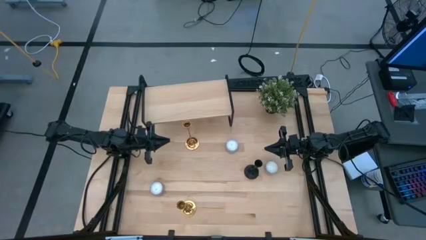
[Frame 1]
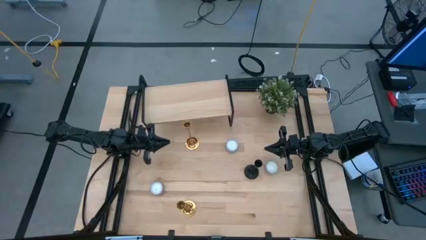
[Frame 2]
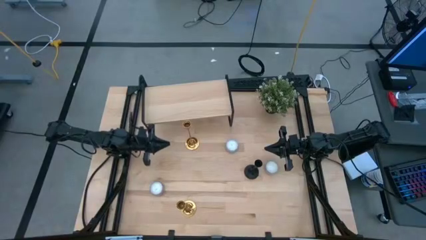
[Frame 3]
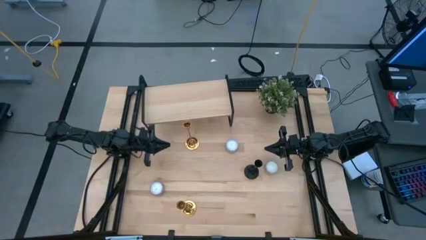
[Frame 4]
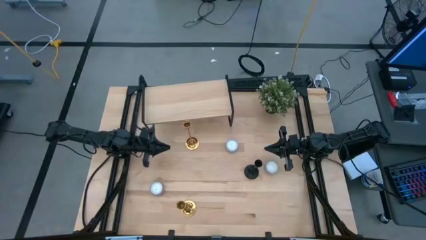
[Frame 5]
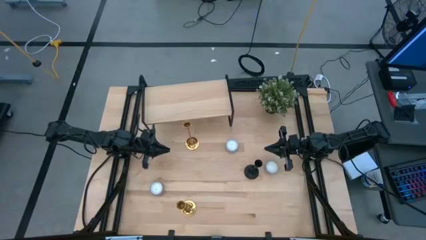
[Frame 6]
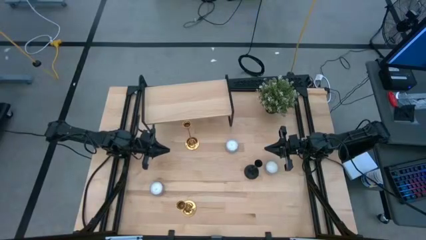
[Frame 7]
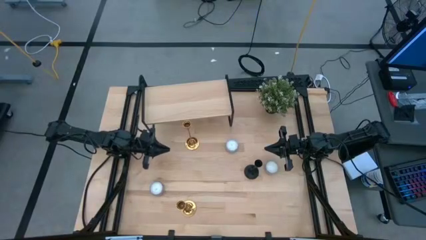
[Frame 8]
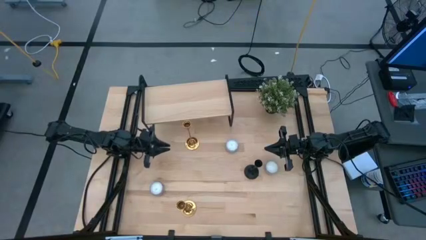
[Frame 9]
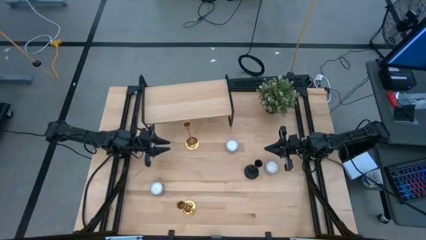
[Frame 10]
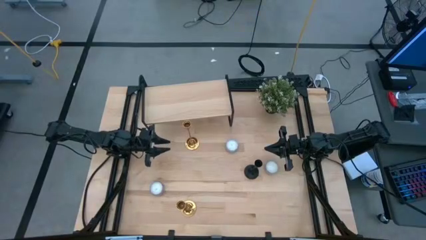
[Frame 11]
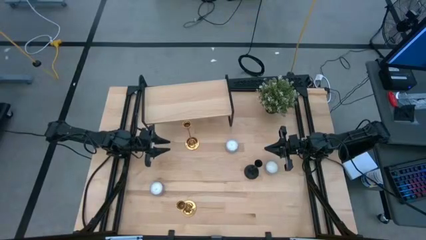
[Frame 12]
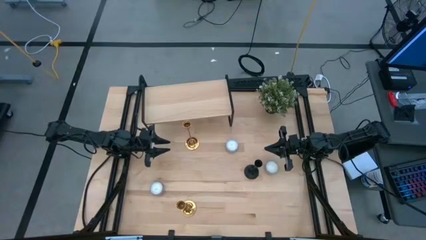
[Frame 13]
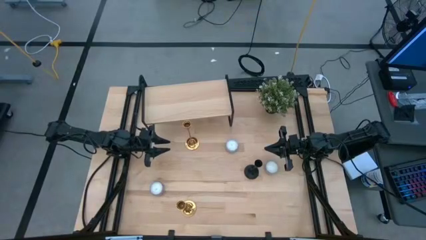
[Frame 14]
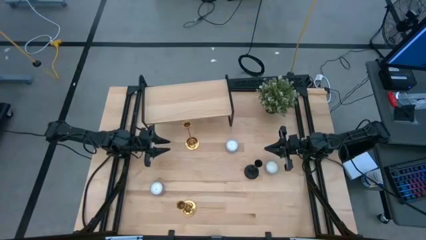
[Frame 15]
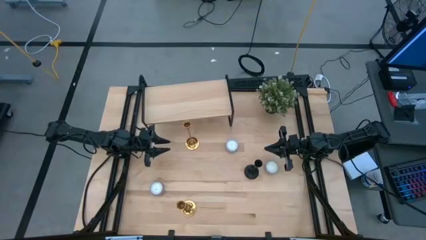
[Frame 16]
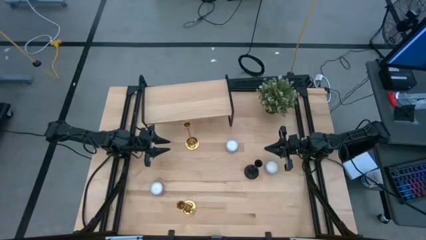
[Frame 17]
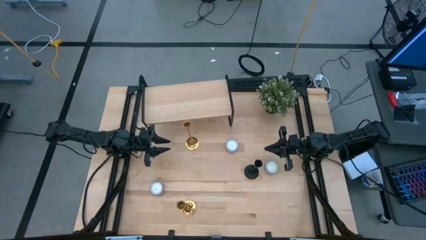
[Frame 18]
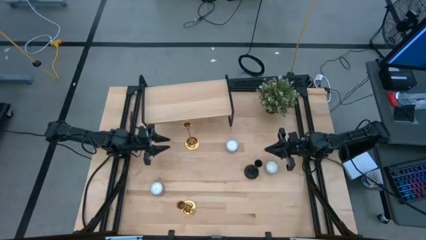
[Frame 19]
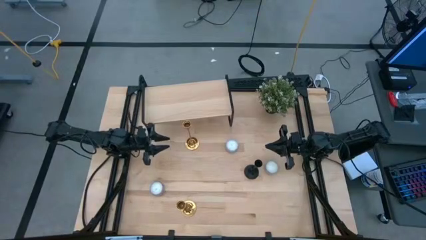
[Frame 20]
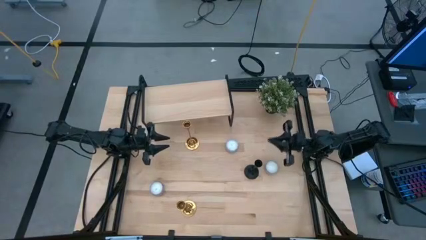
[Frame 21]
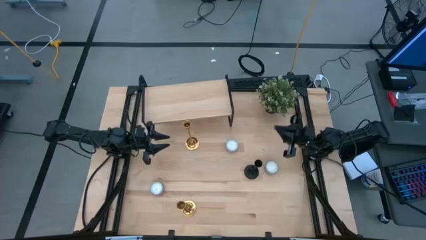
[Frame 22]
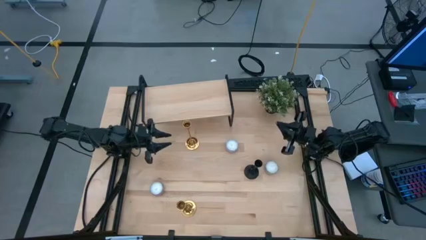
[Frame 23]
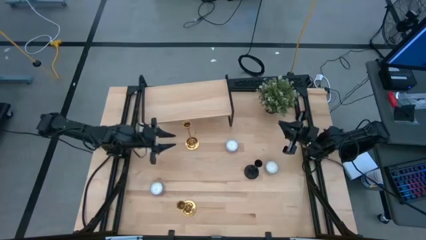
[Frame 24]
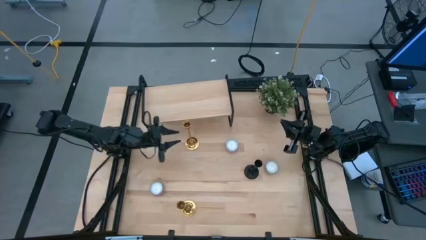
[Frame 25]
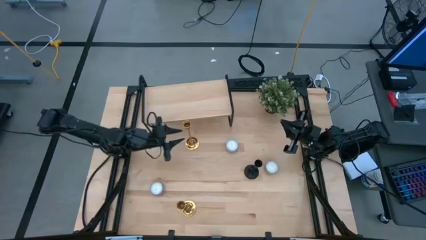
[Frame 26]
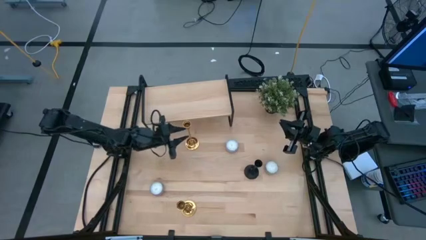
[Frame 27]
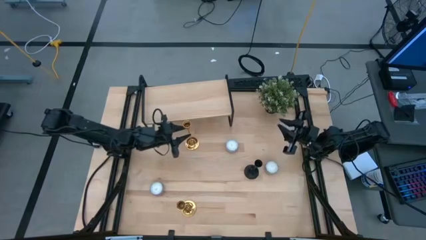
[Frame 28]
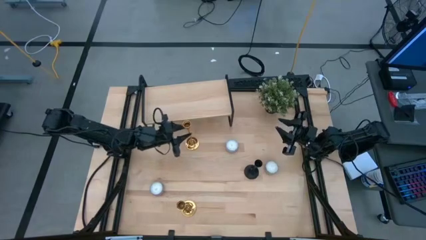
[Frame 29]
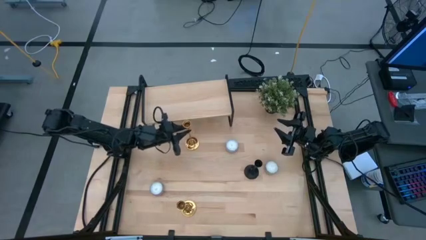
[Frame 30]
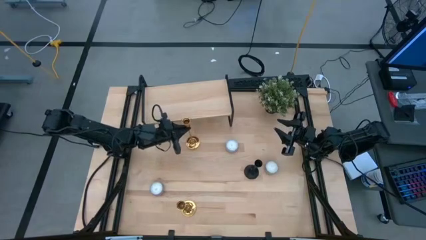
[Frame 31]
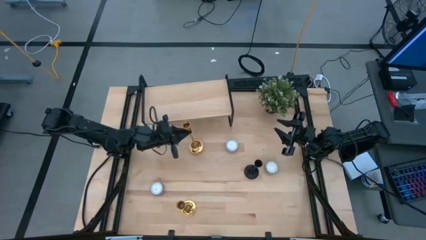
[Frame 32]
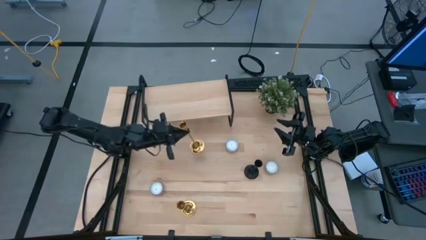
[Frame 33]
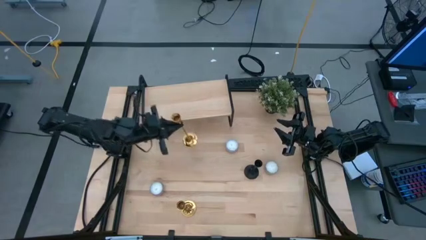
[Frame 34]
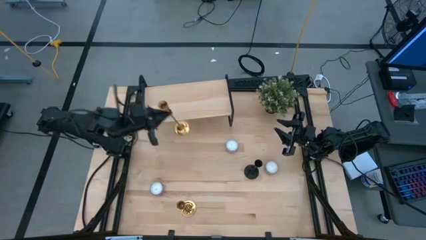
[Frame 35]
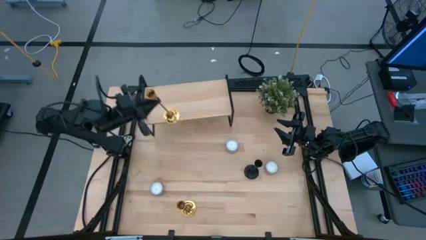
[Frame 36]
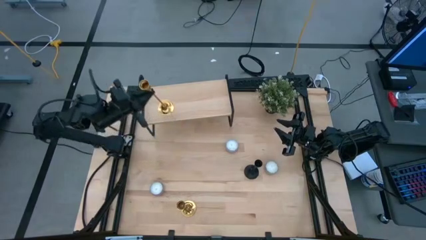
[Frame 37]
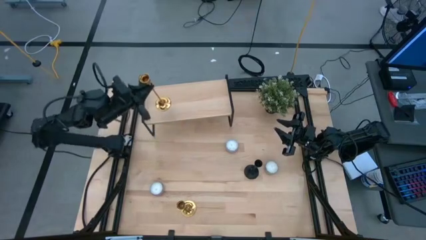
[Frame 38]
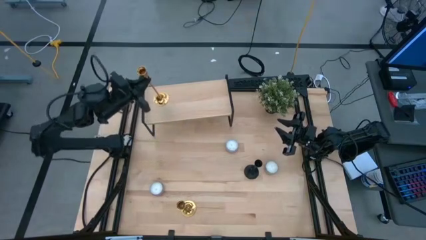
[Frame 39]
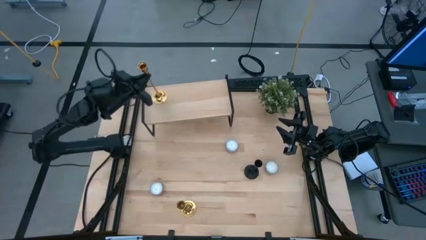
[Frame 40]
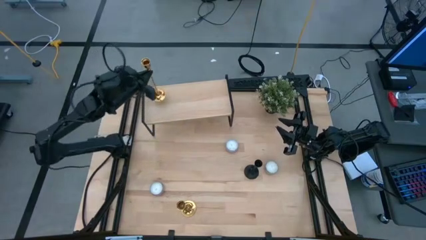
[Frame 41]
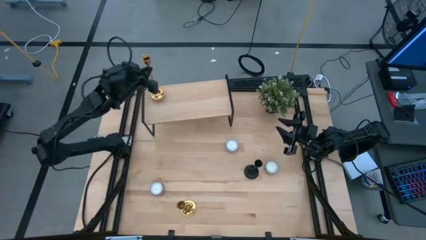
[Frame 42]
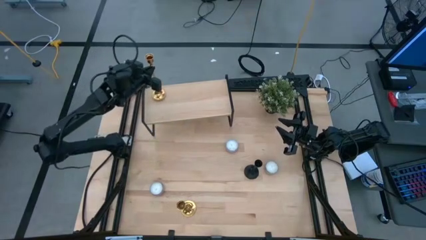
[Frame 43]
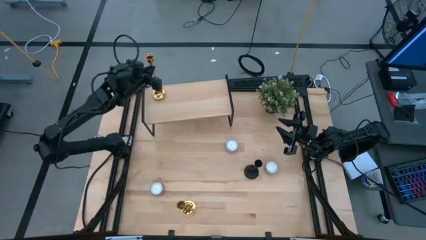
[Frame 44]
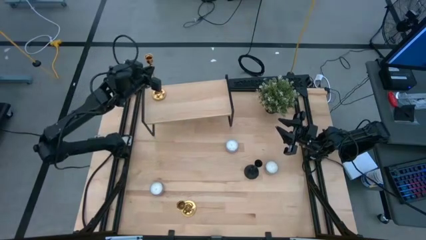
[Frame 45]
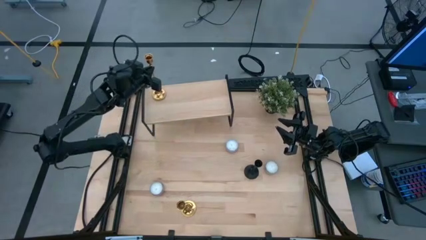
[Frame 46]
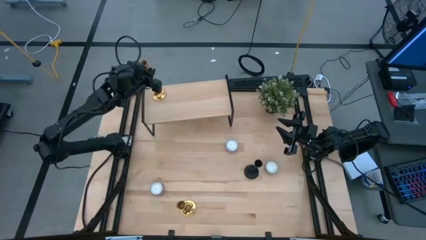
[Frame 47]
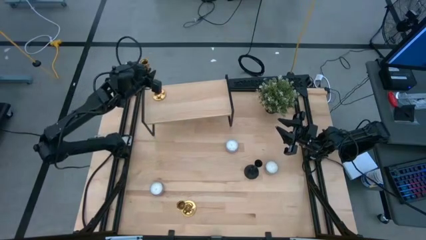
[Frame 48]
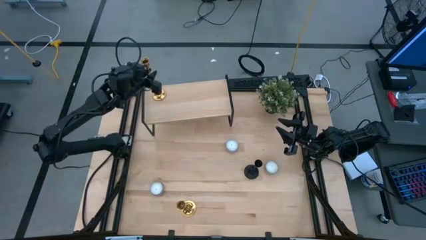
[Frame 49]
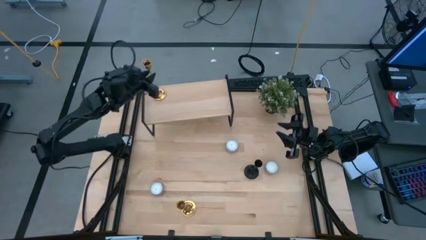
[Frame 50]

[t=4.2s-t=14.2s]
Task: Pick & Place candle stick holders
Put the top gold candle holder on the shelf

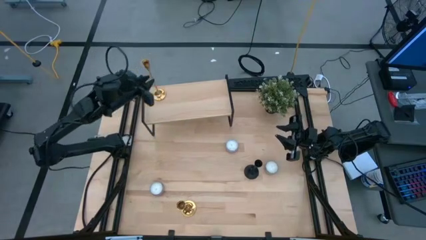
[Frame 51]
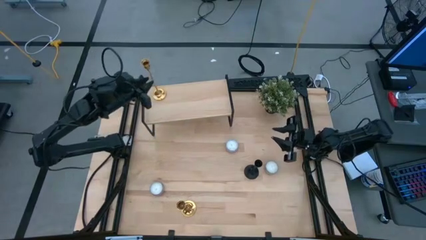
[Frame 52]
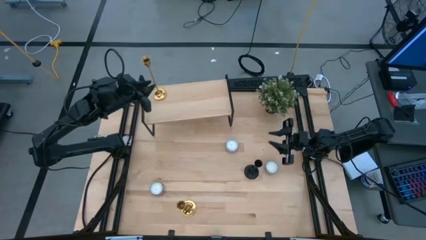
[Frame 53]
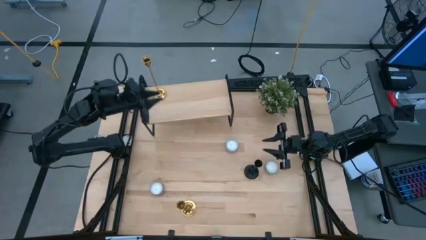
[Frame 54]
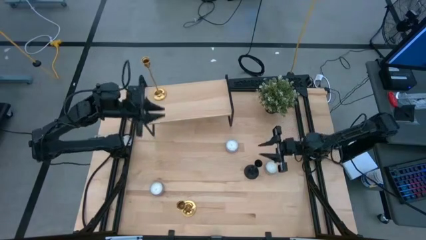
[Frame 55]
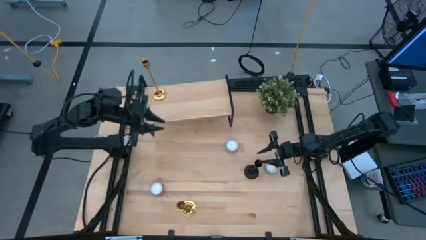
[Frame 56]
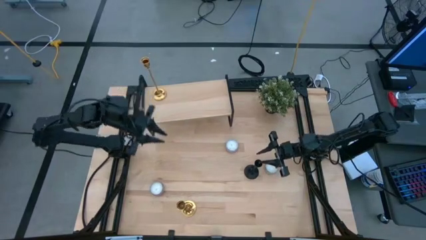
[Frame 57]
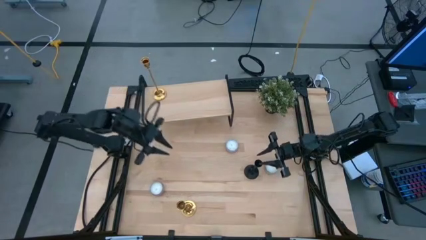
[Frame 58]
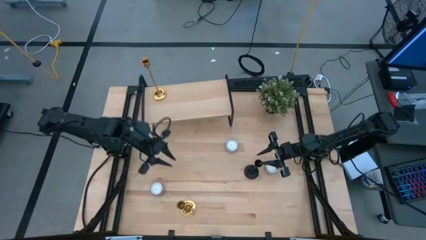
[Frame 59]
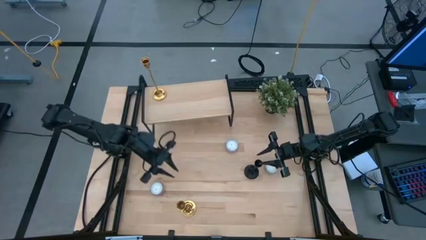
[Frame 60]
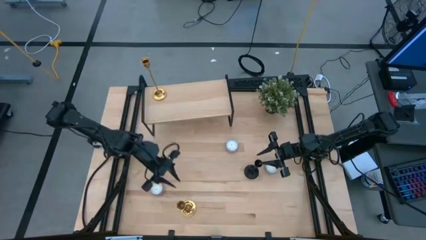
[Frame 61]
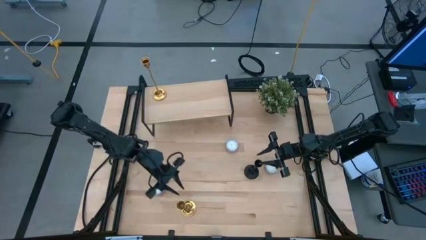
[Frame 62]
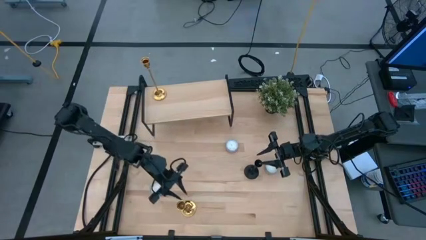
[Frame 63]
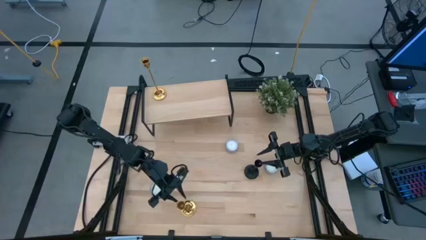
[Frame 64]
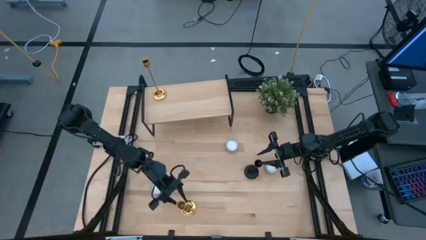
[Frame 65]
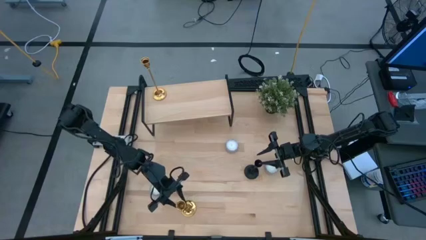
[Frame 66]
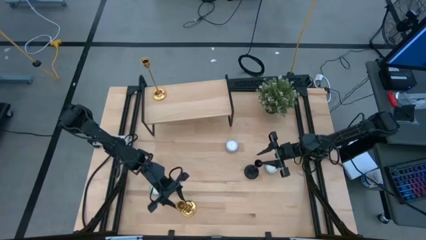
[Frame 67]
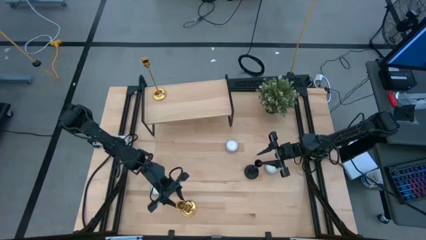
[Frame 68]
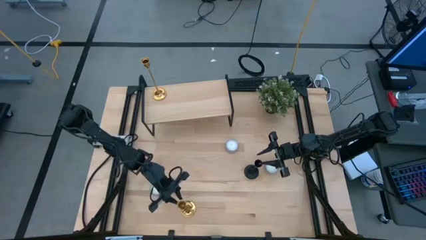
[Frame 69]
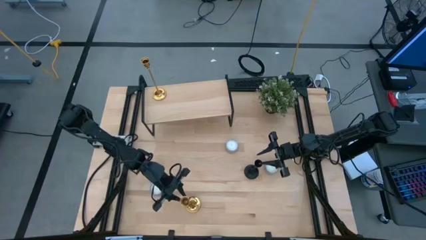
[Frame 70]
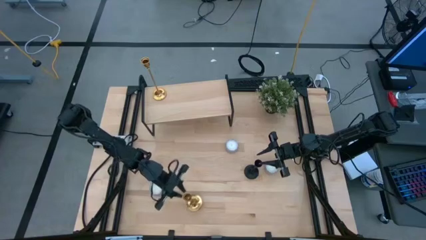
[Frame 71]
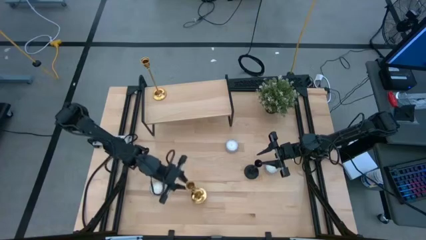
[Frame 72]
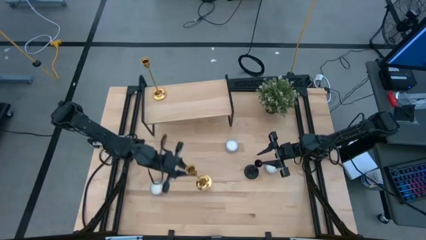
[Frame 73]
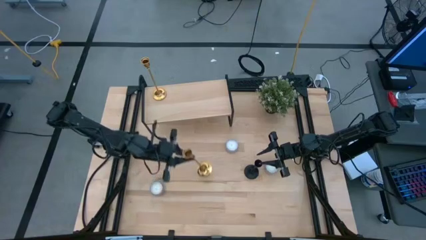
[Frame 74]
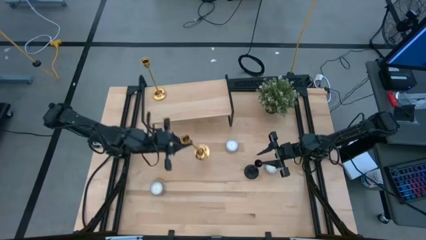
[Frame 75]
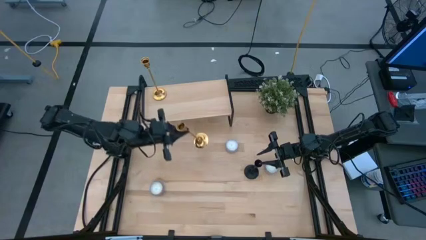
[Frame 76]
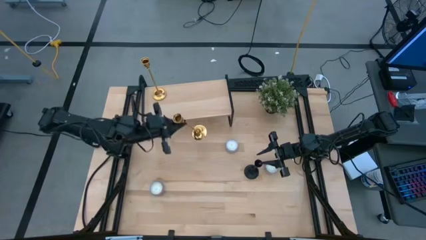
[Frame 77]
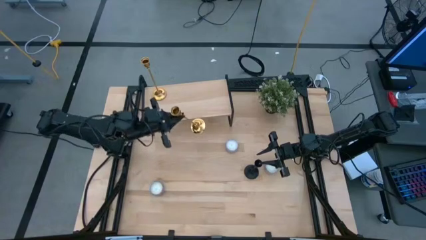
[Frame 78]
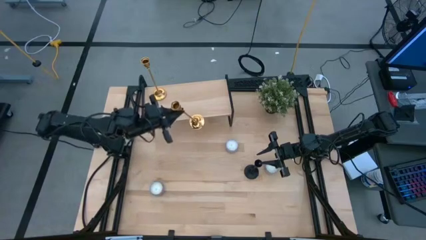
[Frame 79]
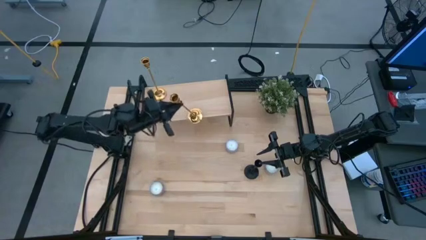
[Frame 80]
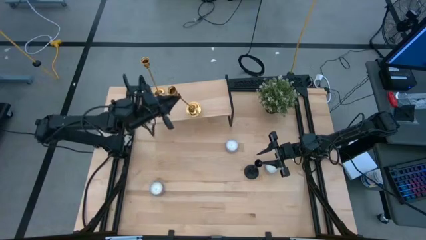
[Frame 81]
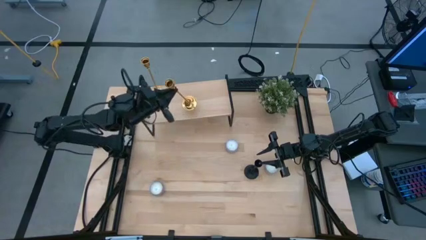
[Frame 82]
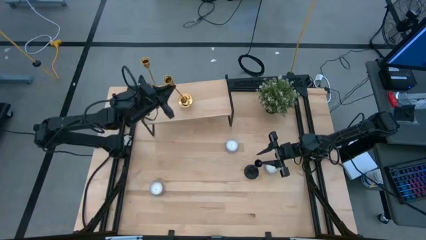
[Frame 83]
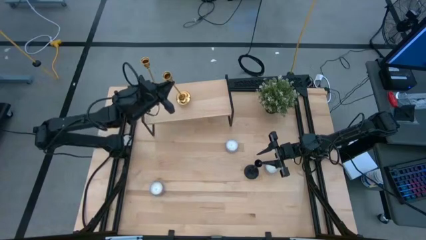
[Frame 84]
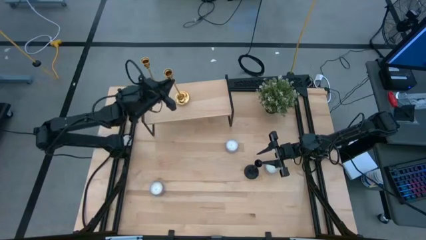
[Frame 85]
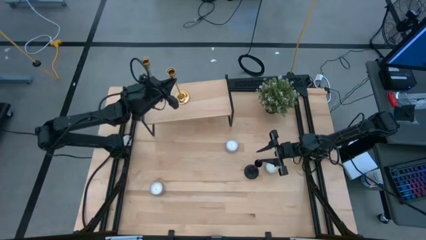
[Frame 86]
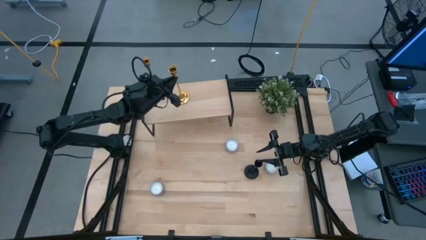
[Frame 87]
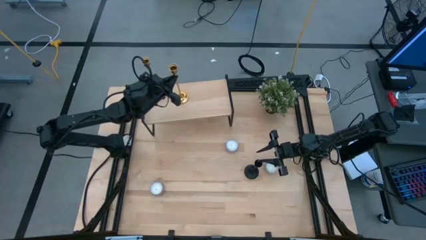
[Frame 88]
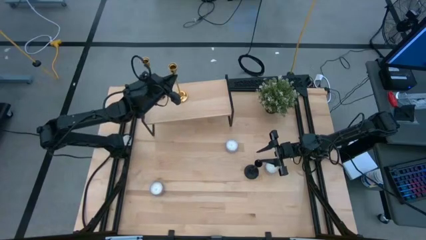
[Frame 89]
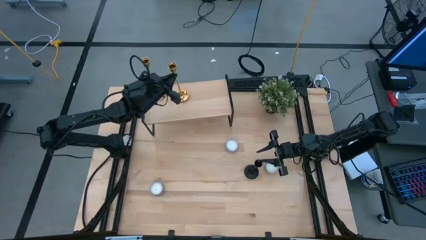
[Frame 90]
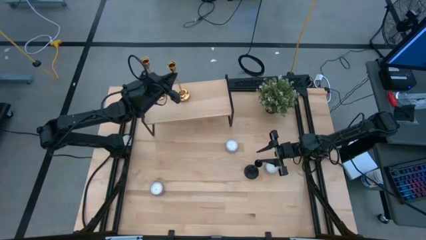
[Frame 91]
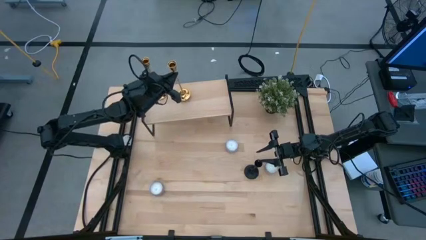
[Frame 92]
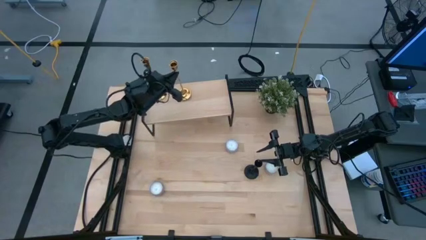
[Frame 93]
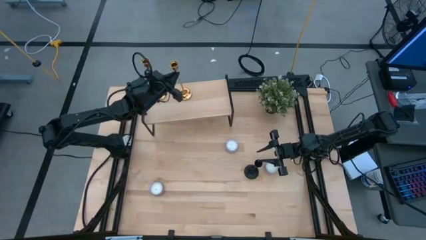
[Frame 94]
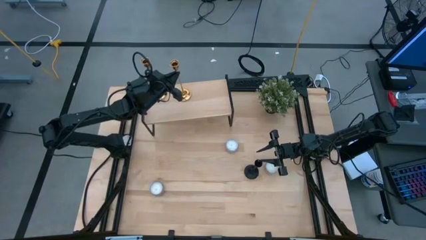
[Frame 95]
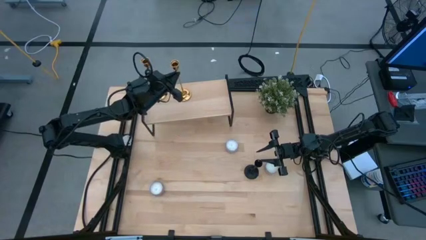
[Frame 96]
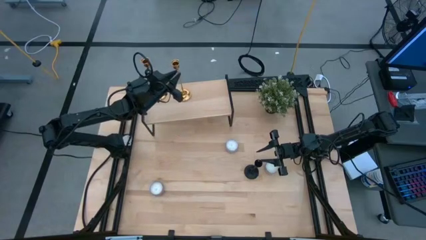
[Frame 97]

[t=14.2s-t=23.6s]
Put the gold candle holder on the shelf
